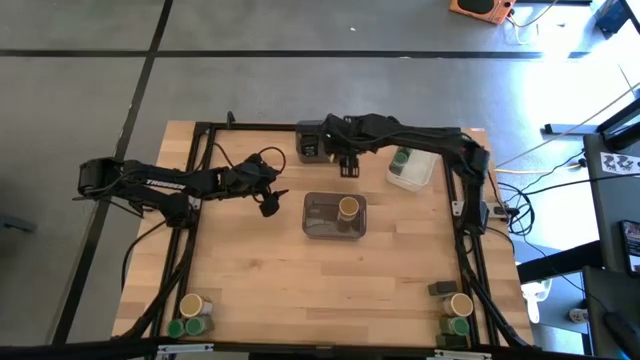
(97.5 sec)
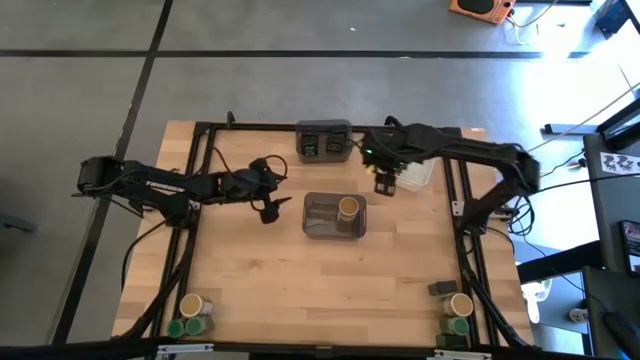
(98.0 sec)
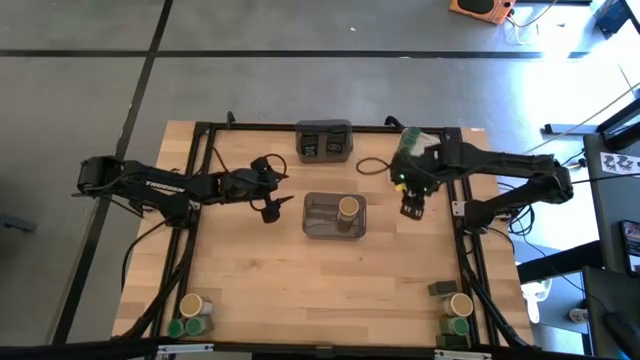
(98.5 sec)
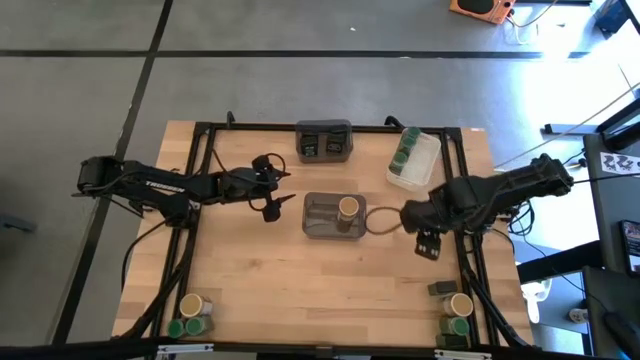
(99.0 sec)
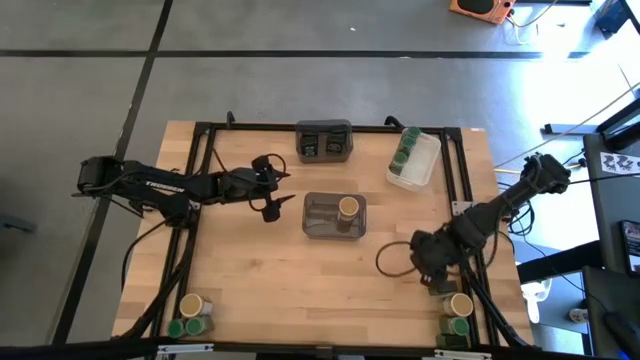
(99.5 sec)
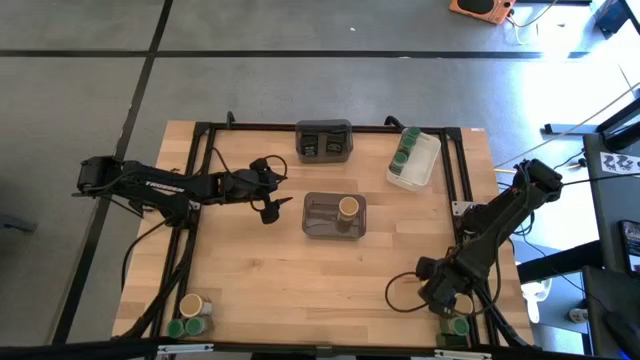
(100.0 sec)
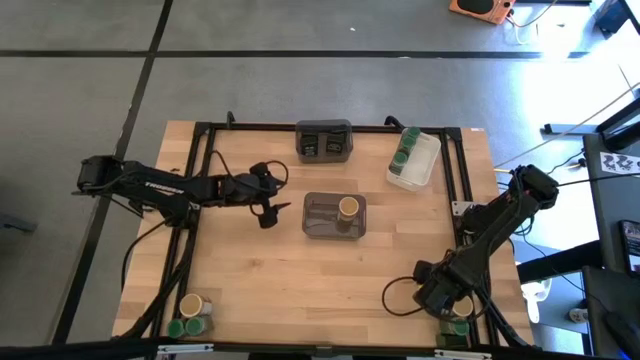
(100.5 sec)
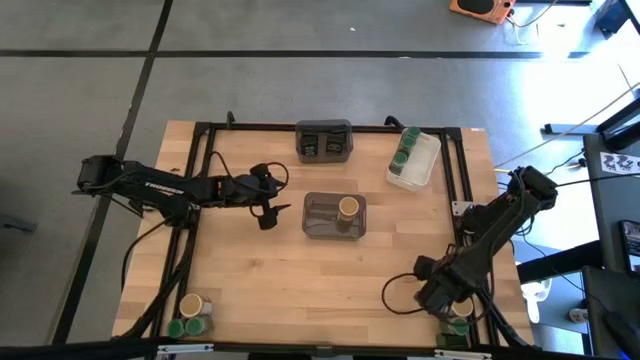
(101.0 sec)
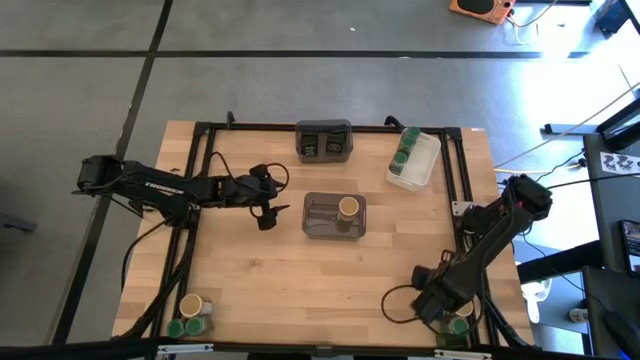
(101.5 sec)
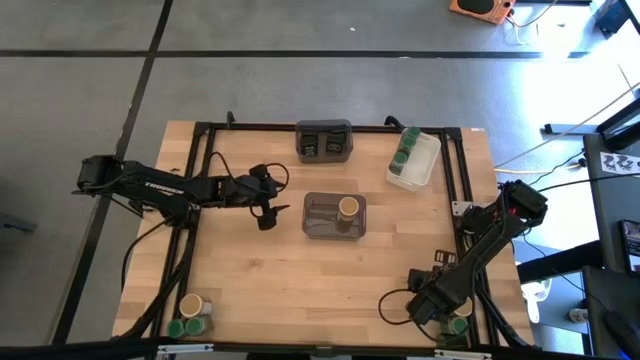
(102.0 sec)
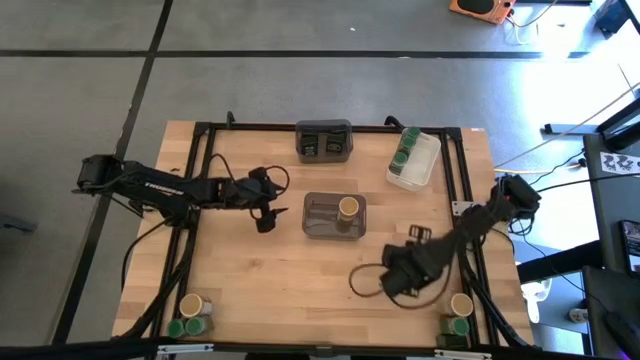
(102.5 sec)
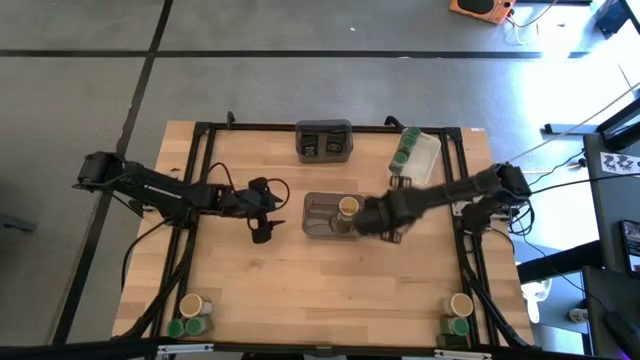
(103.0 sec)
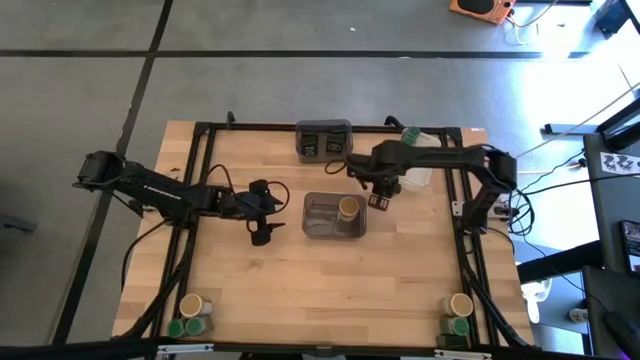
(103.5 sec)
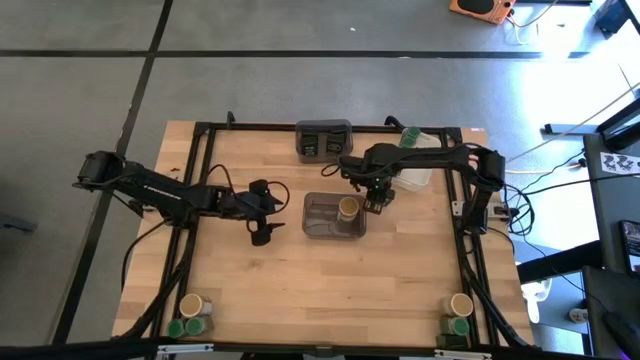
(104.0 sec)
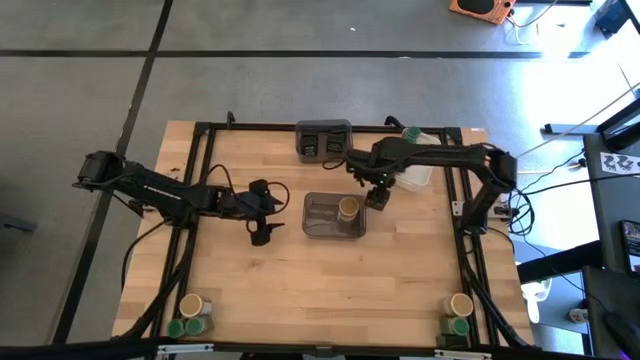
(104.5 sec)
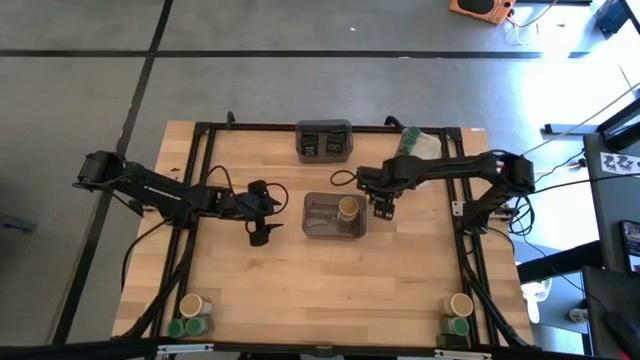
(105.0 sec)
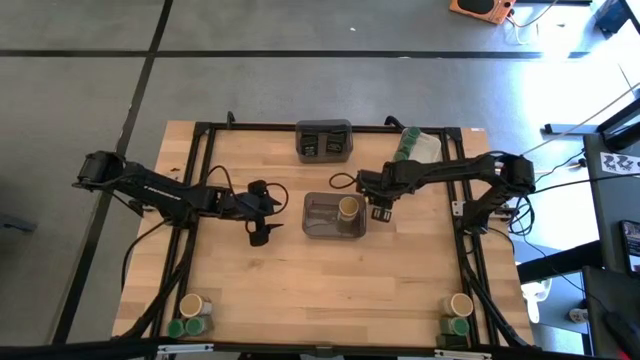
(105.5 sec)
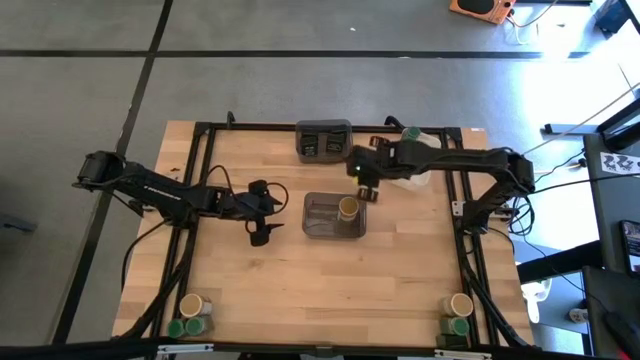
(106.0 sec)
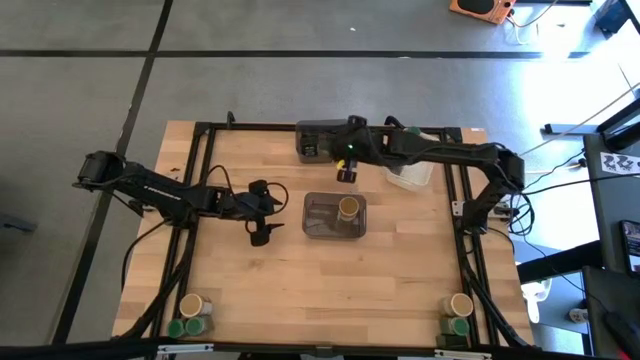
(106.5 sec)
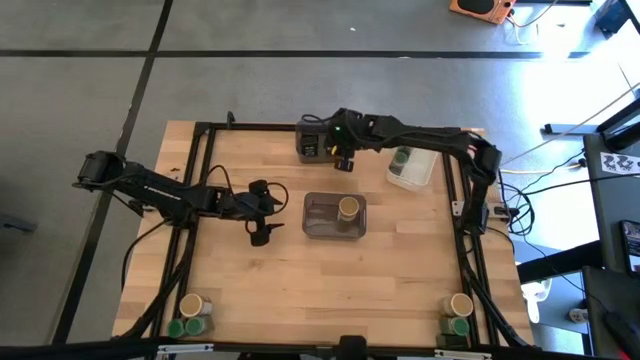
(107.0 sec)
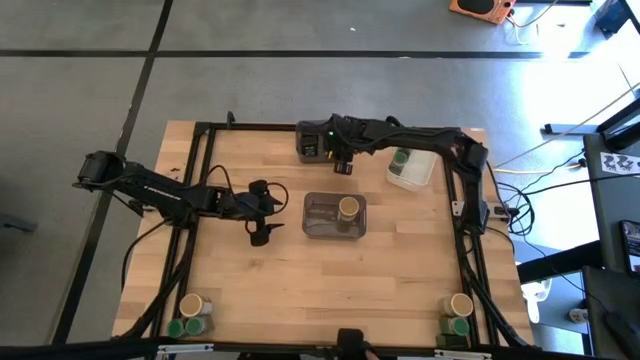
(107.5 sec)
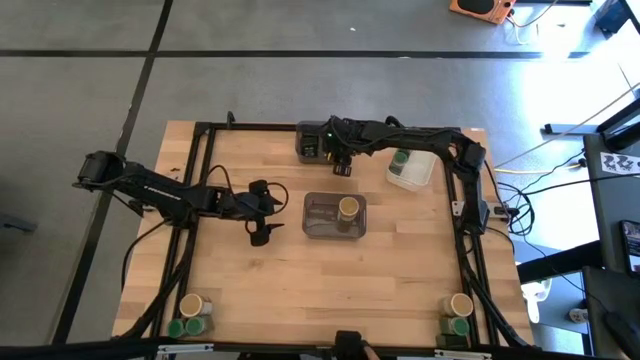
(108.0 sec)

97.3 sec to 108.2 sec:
Task: Sort spices by type
Put the black seasoning can into the top black bin

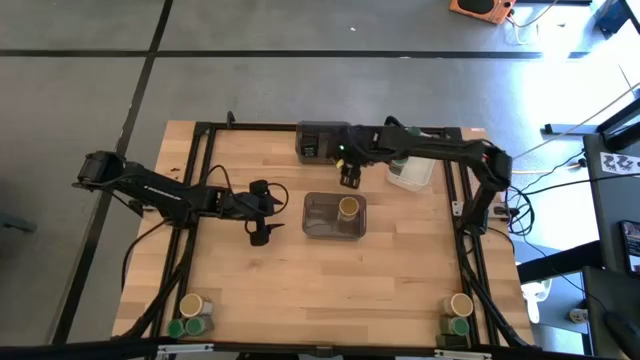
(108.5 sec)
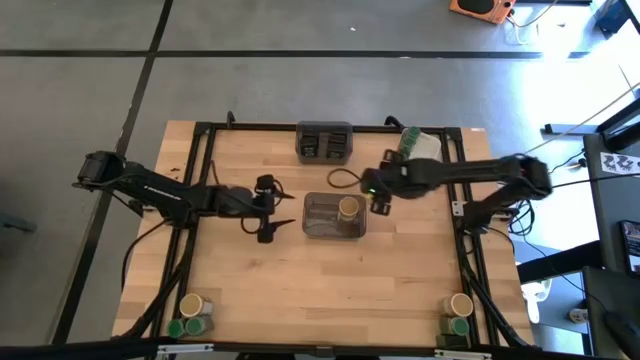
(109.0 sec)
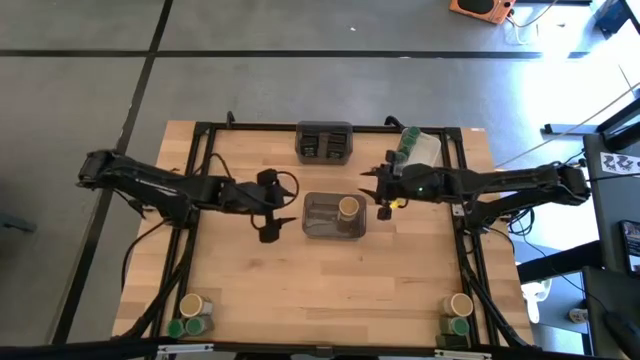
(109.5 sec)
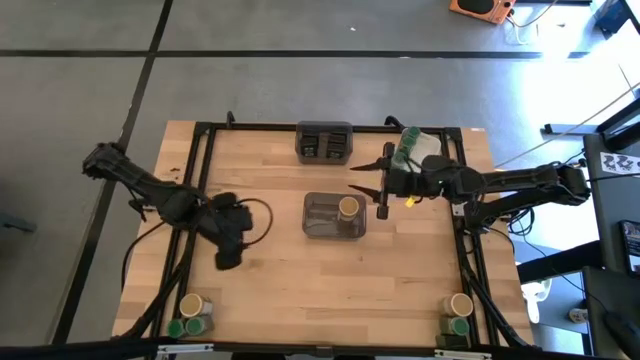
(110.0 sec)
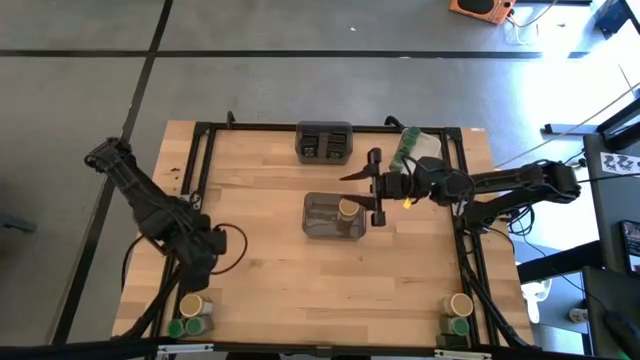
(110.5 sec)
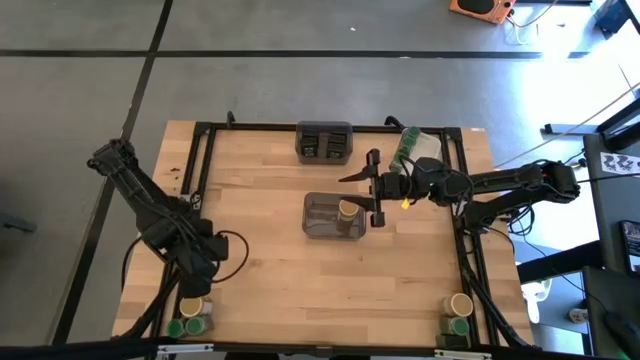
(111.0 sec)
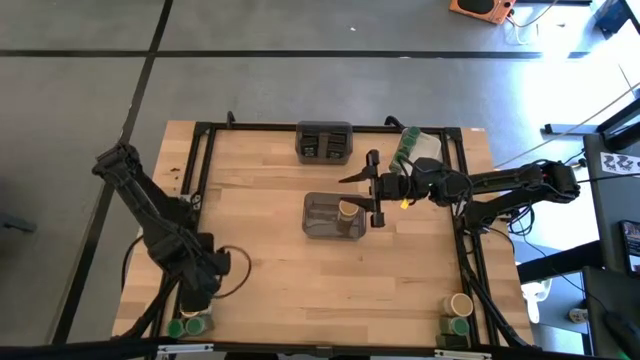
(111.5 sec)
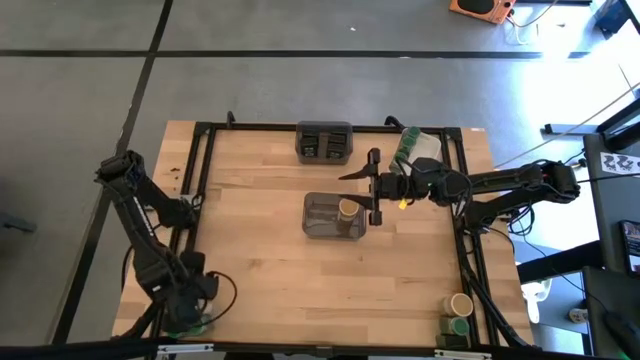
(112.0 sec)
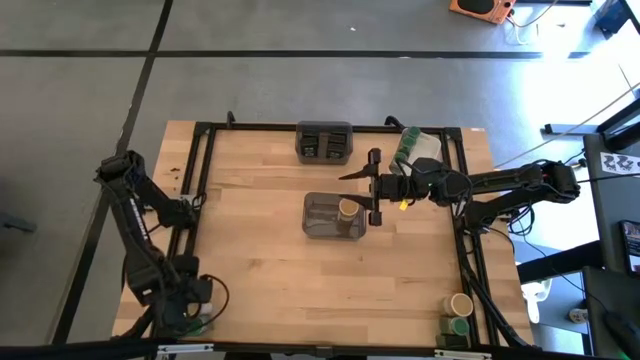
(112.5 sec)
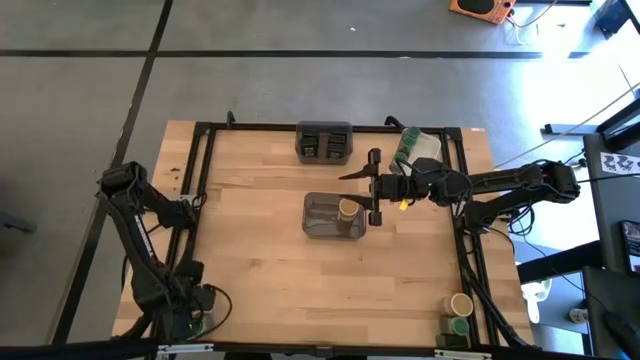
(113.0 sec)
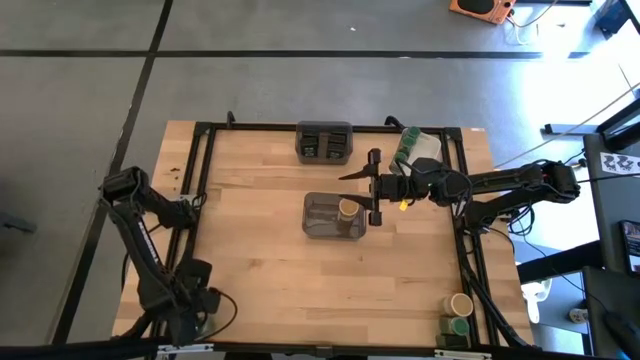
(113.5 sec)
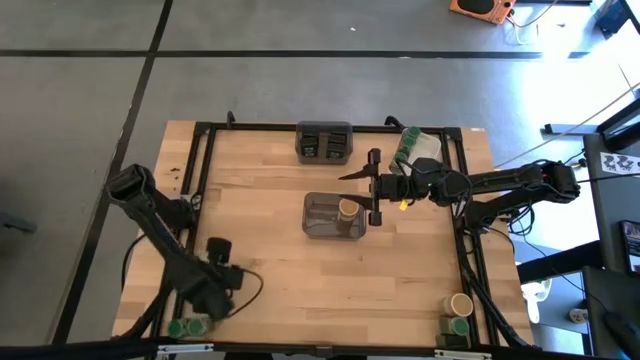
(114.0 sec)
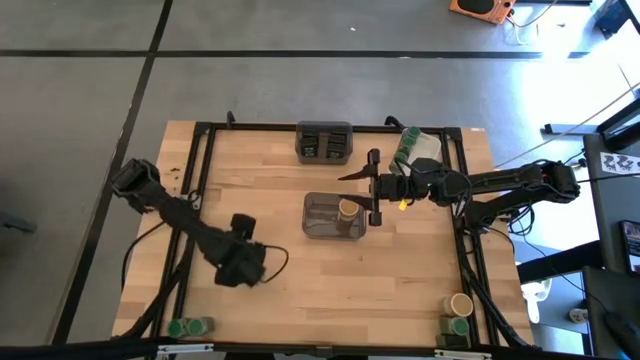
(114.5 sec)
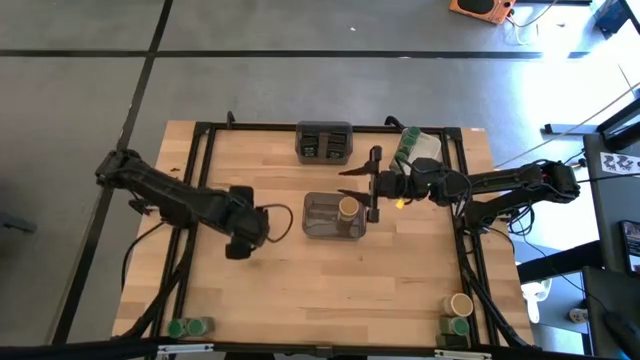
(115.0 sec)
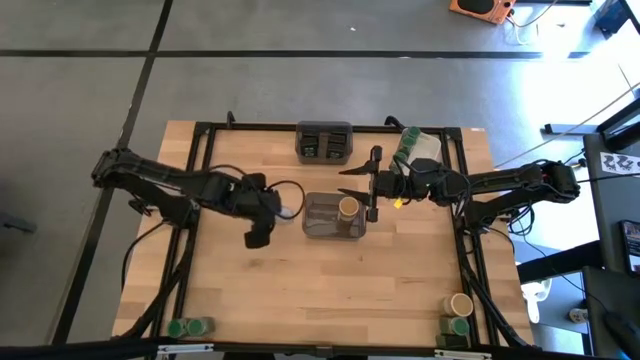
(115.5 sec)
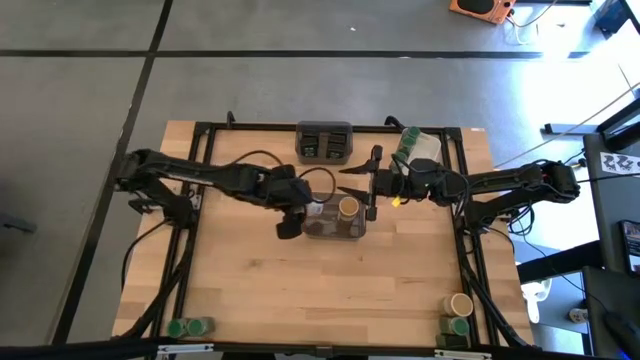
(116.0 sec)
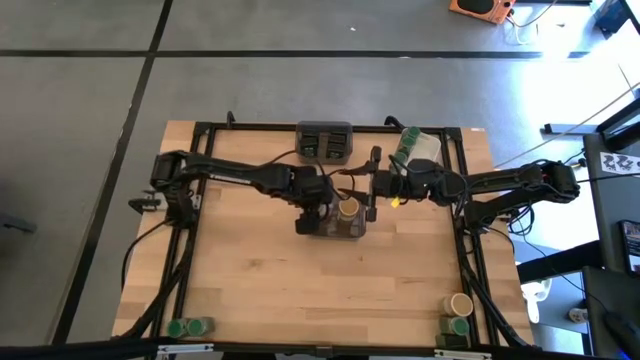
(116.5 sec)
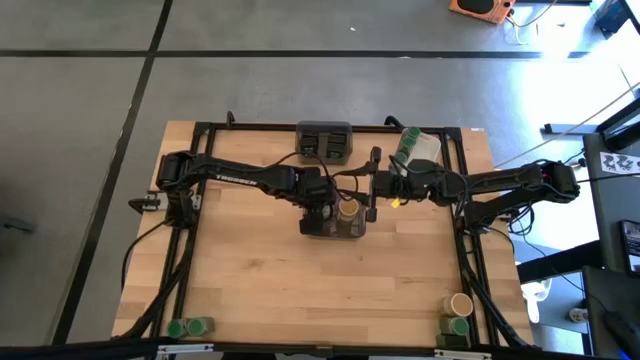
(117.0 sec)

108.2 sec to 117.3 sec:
Put the golden seasoning bottle into the bottom black bin

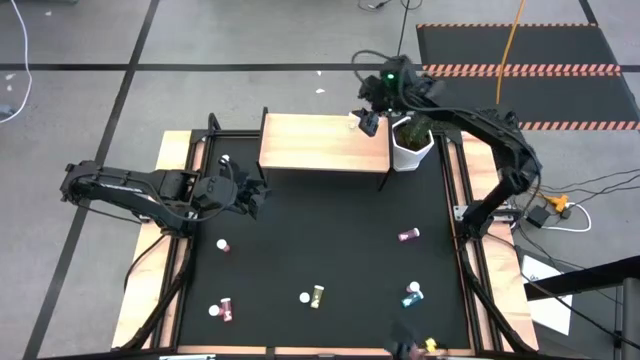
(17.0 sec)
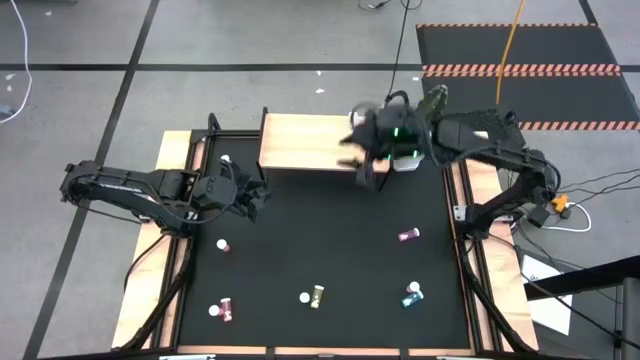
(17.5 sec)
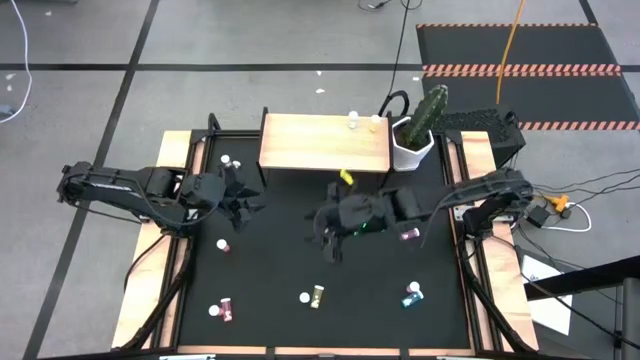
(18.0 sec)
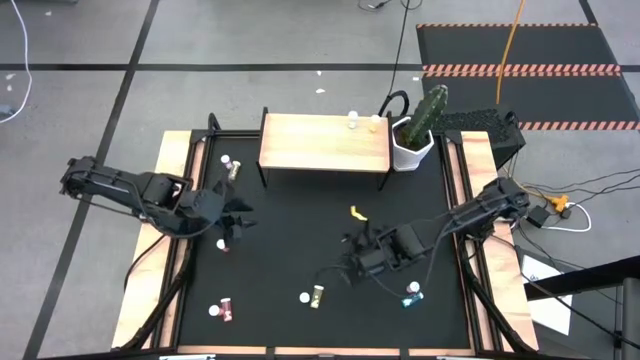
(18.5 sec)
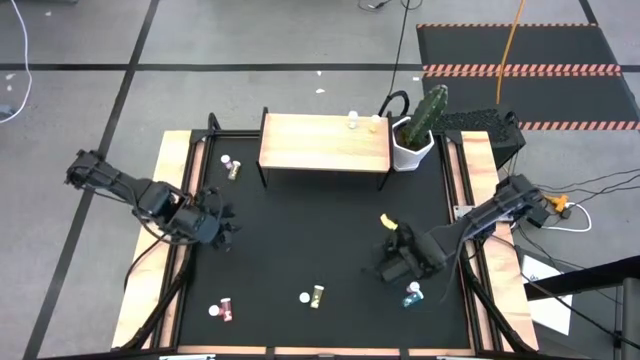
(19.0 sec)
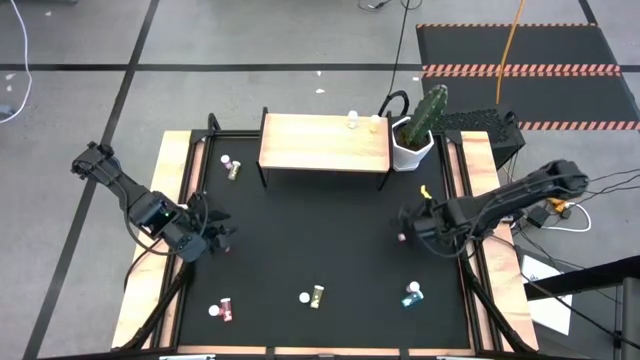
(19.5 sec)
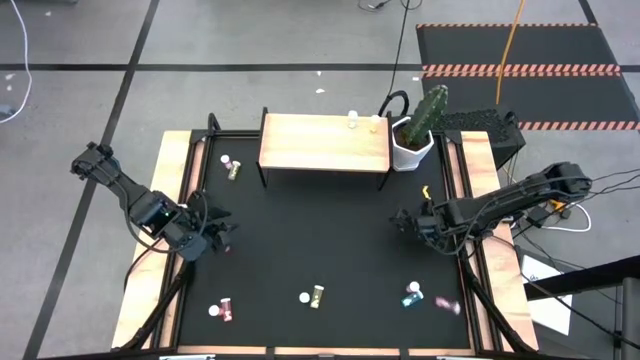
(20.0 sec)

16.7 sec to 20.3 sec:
Task: Pick and place medicine bottles onto shelf by color
Put the middle right purple pill bottle on the shelf
